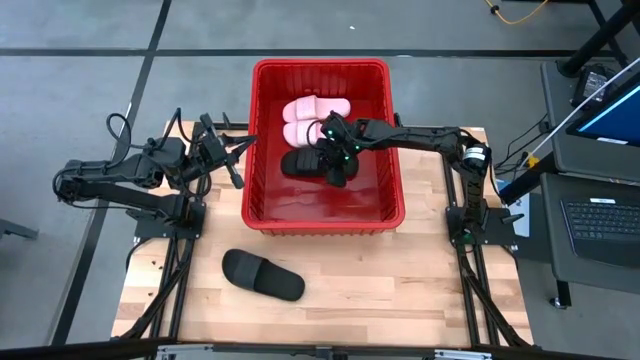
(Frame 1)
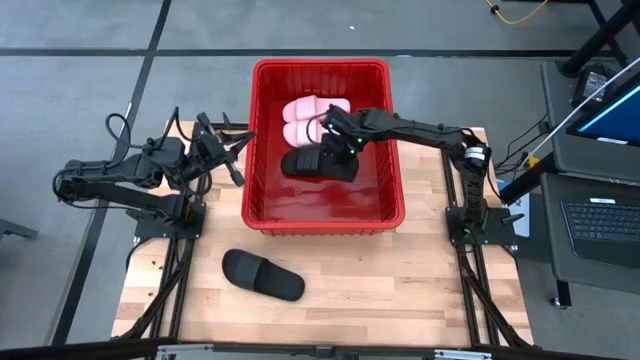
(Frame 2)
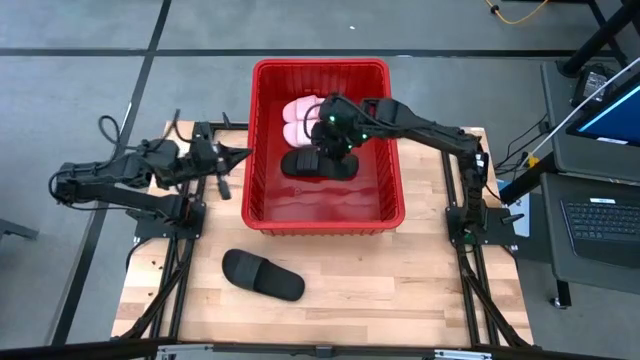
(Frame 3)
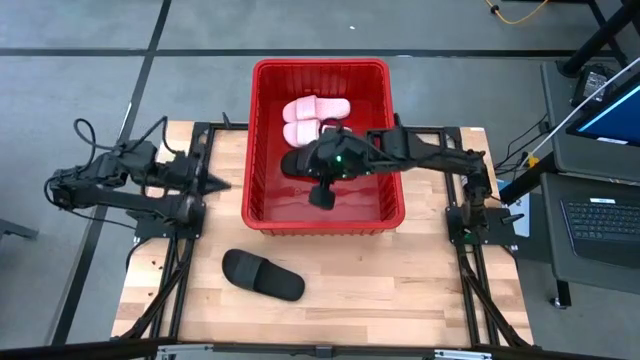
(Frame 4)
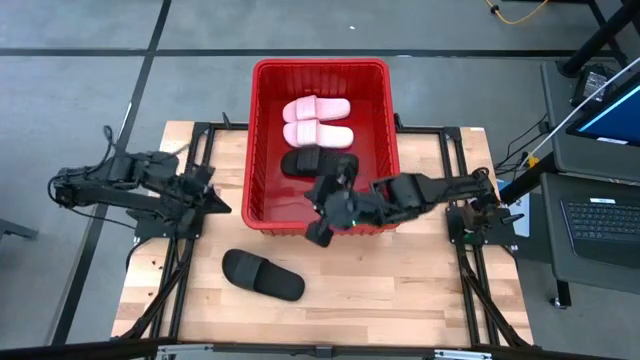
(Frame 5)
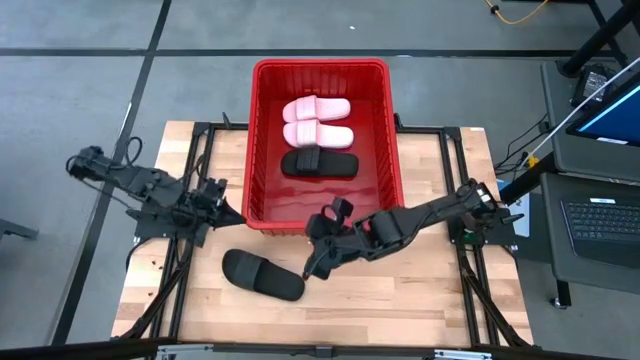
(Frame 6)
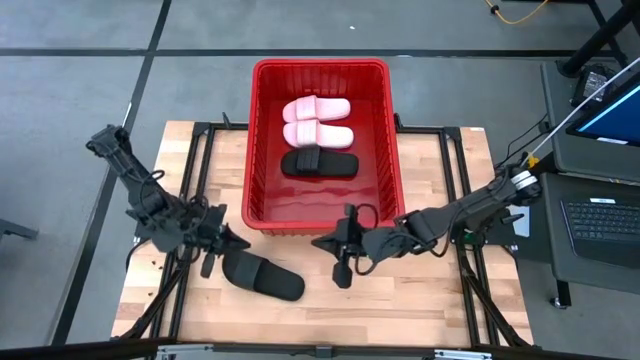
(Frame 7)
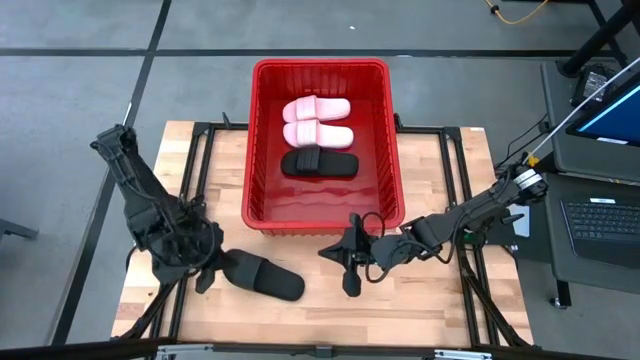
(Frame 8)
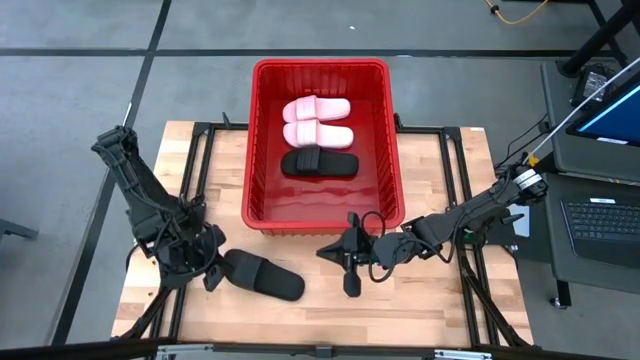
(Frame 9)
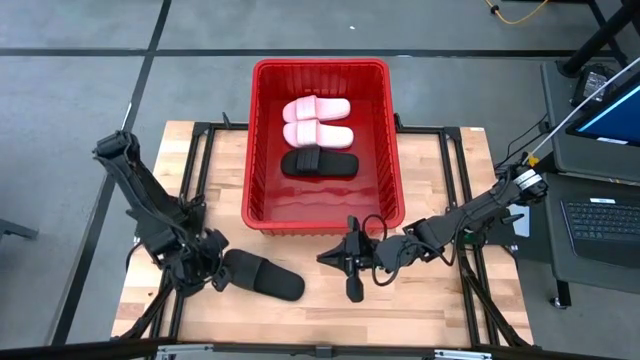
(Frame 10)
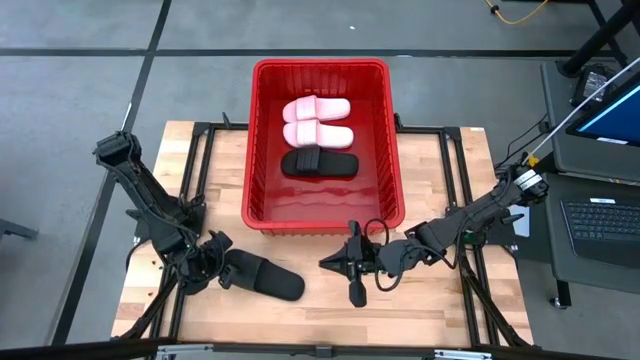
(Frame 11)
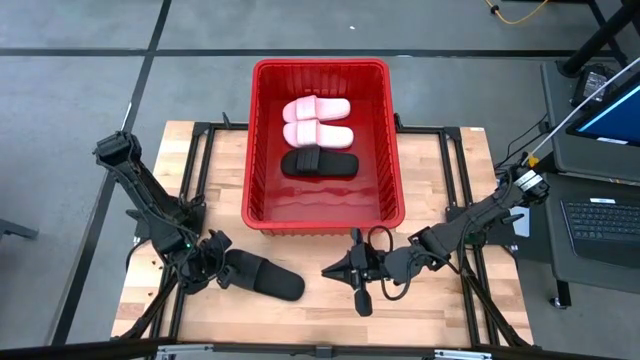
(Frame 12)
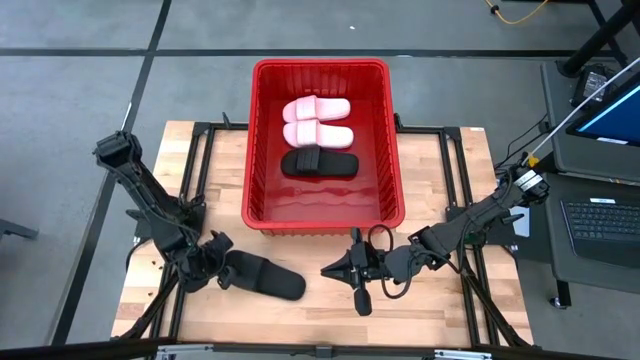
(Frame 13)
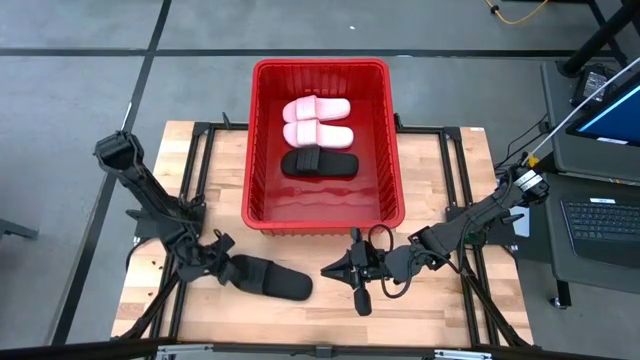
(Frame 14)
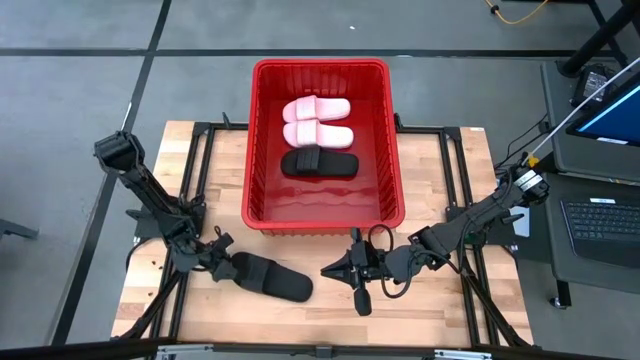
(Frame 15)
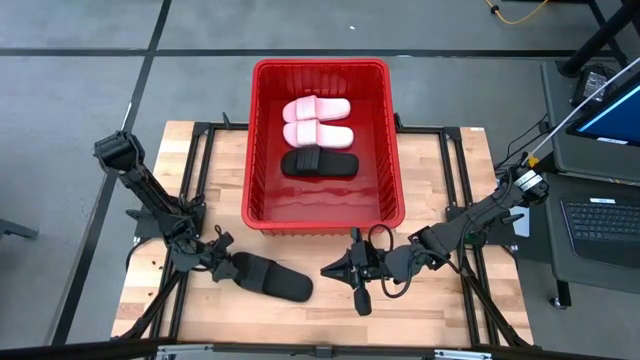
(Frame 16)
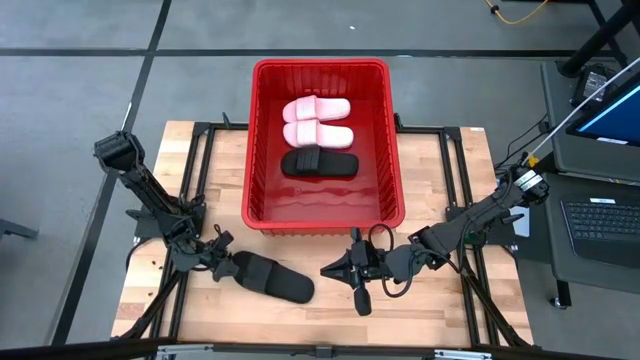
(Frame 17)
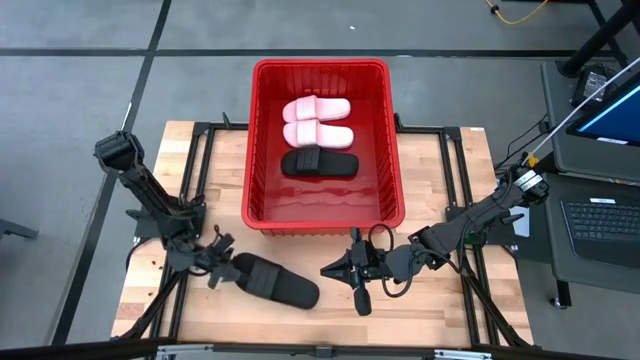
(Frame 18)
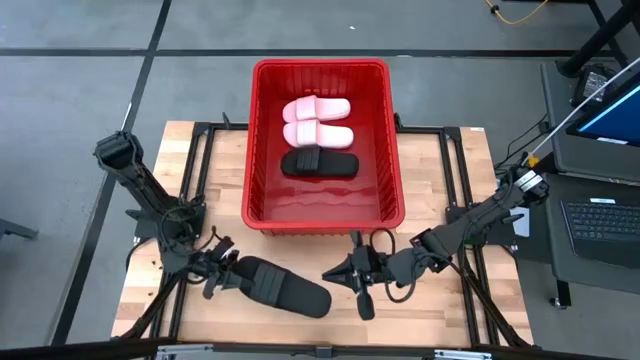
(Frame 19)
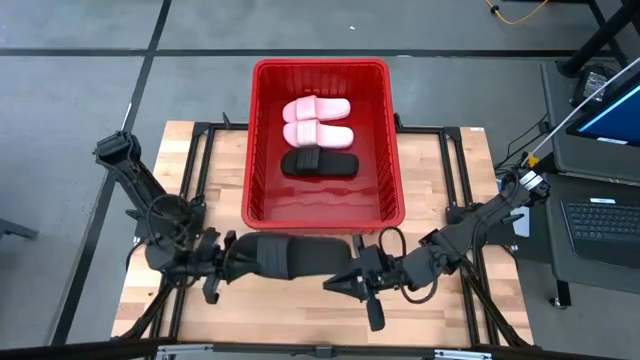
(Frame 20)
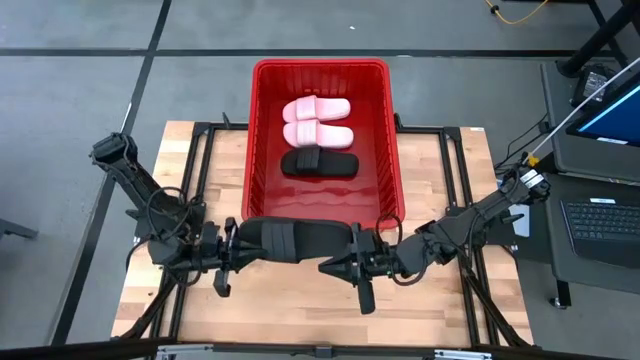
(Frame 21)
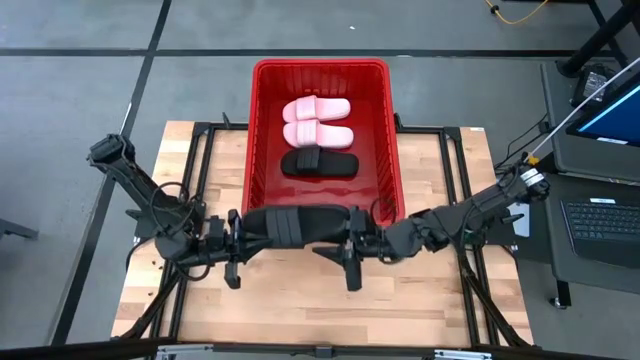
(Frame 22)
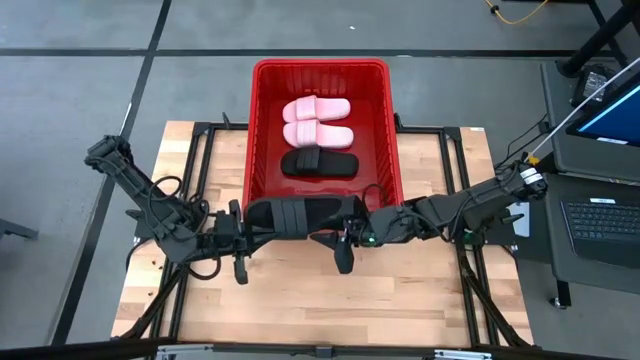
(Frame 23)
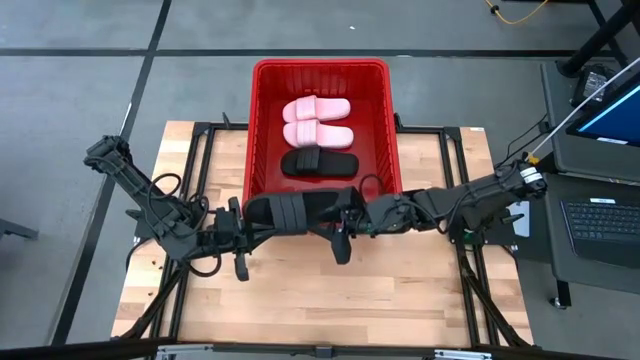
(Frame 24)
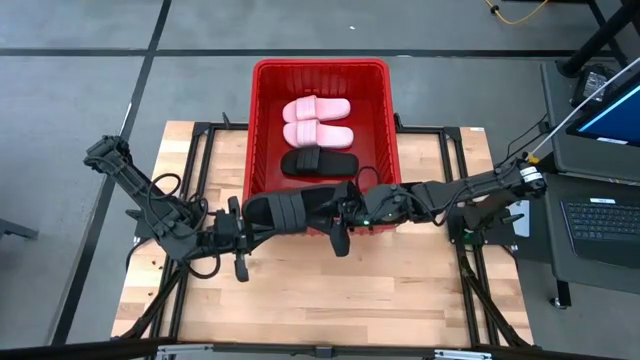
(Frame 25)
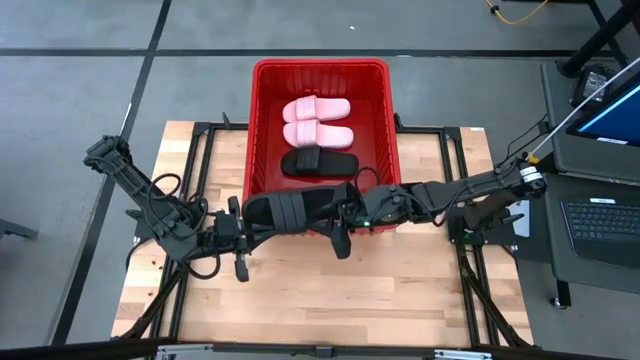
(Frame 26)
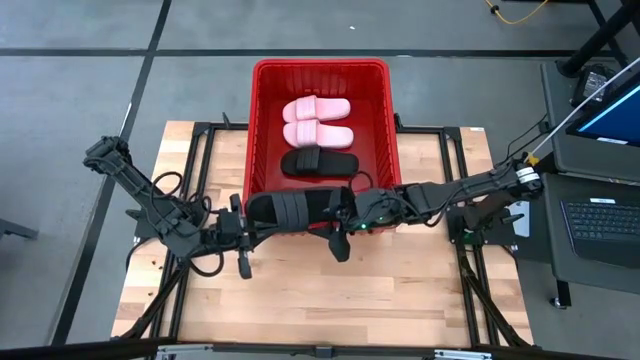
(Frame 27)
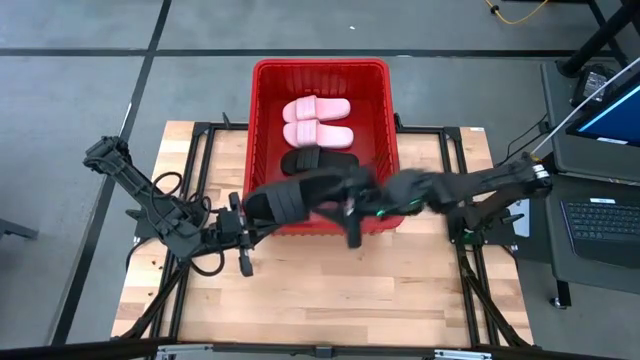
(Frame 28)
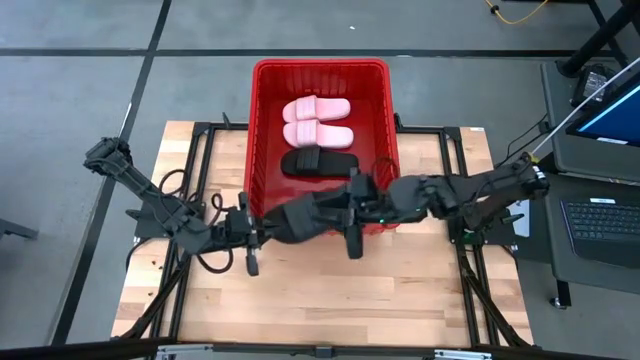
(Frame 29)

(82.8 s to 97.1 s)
Task: Pick and place slides into bin
Put the black slide into the bin

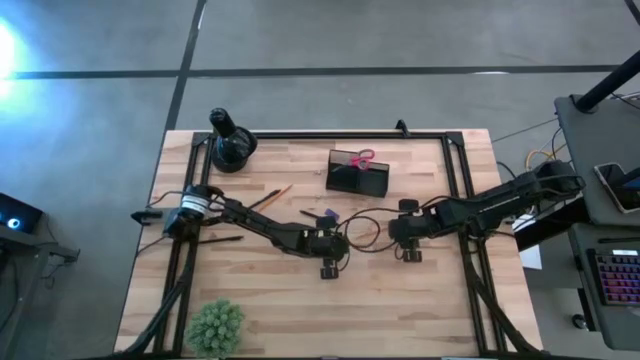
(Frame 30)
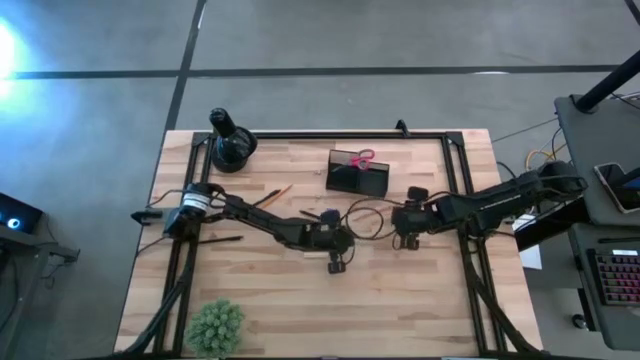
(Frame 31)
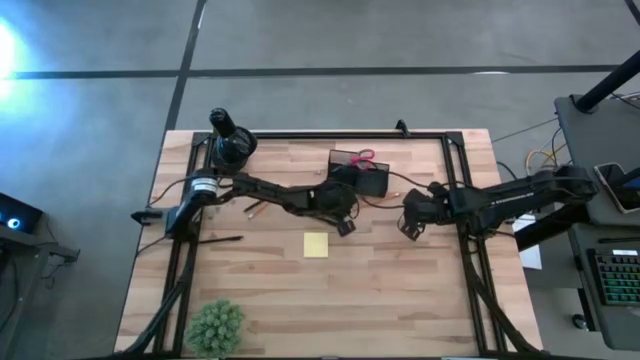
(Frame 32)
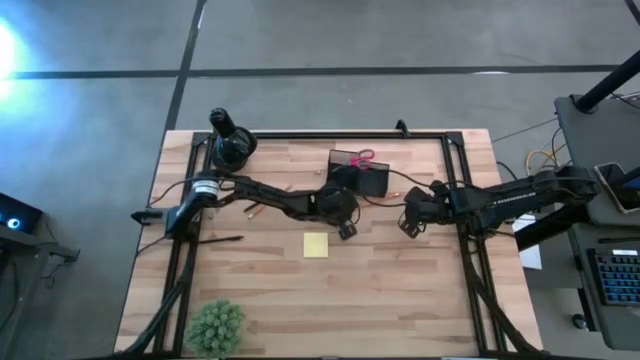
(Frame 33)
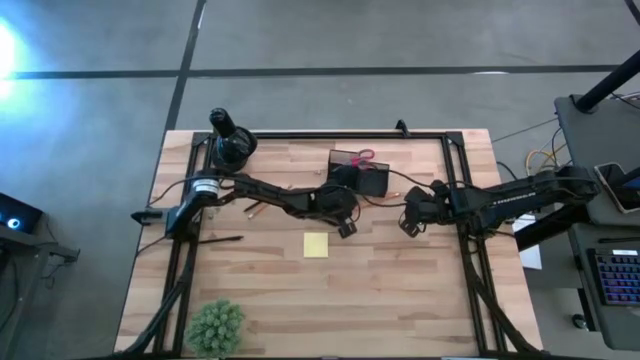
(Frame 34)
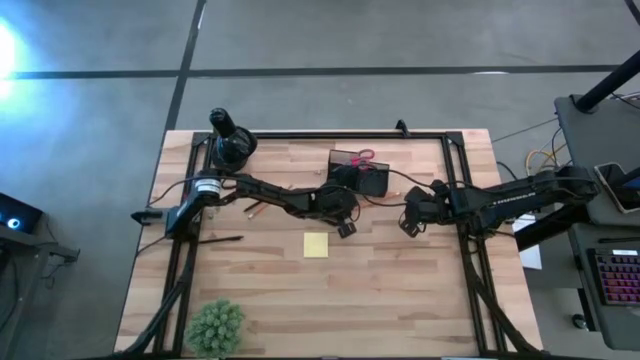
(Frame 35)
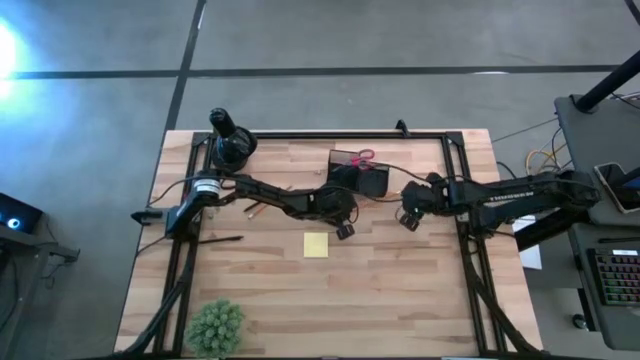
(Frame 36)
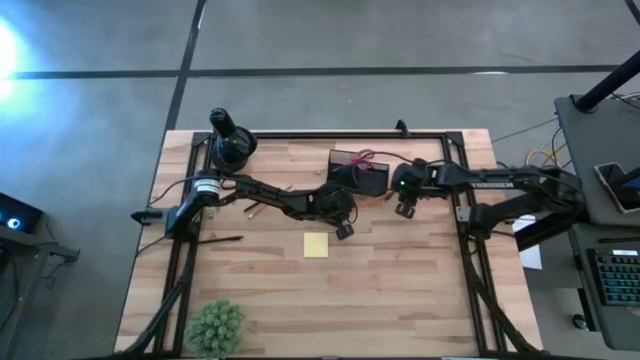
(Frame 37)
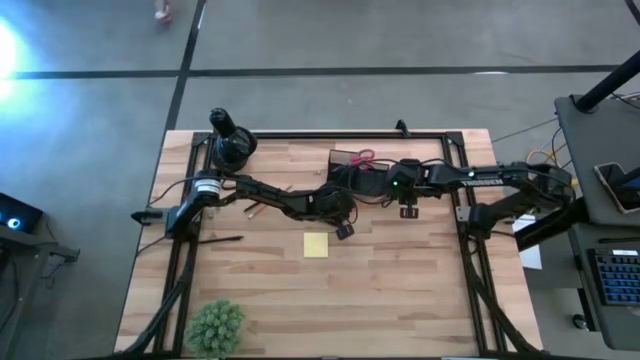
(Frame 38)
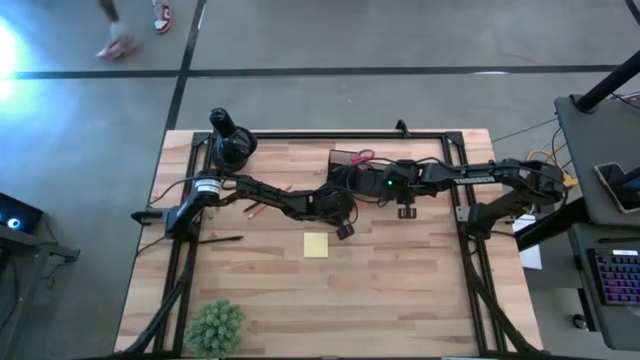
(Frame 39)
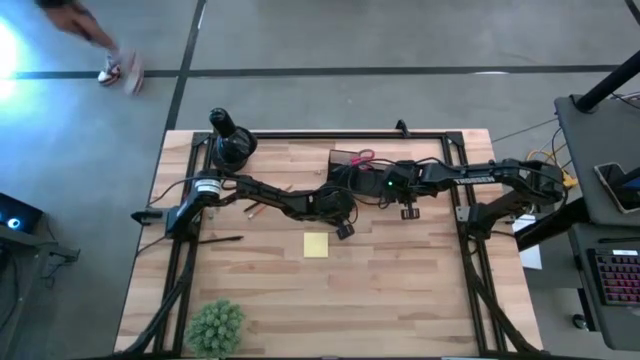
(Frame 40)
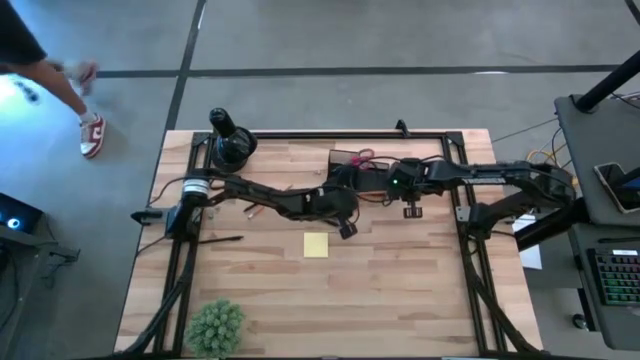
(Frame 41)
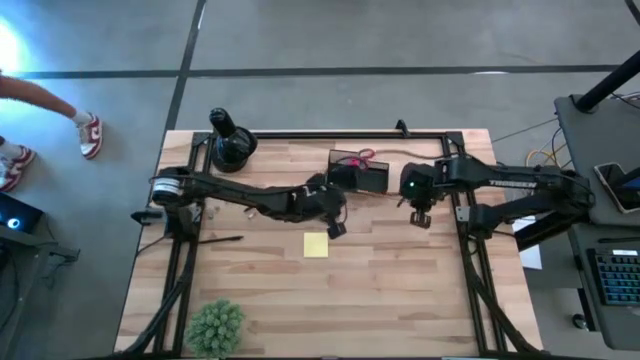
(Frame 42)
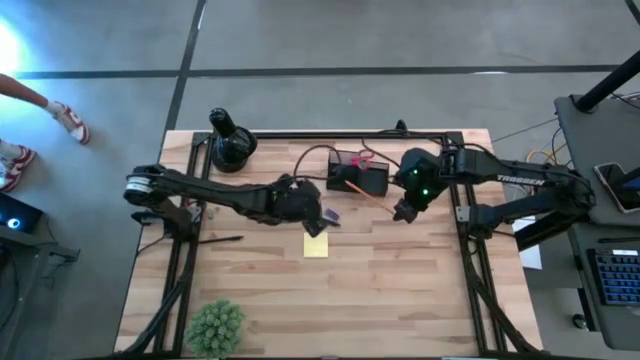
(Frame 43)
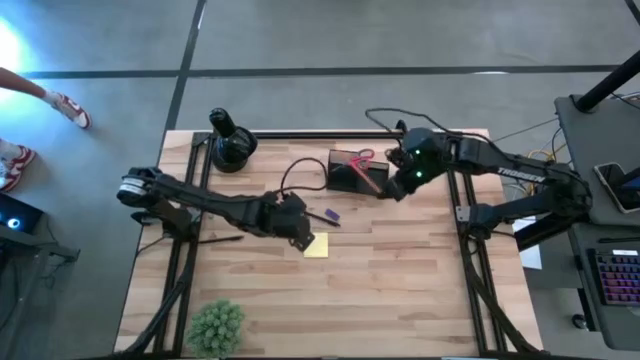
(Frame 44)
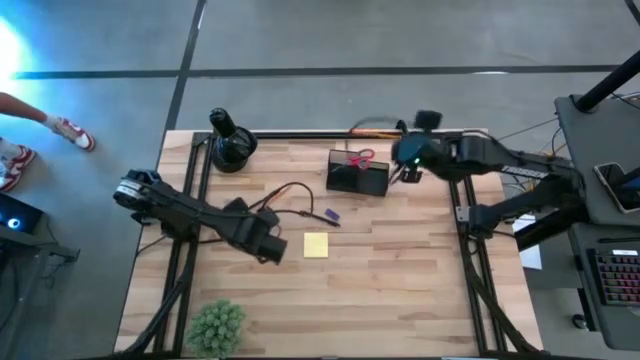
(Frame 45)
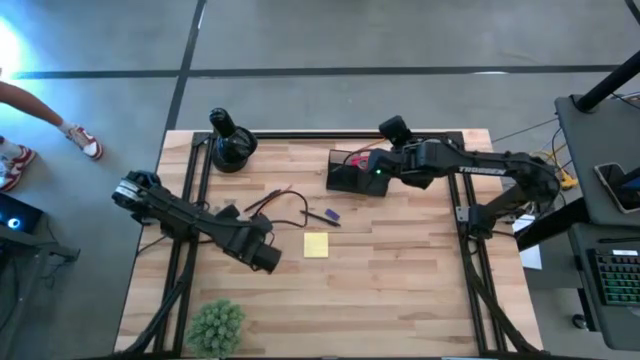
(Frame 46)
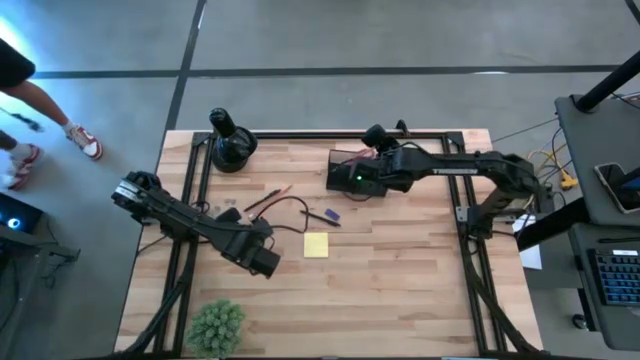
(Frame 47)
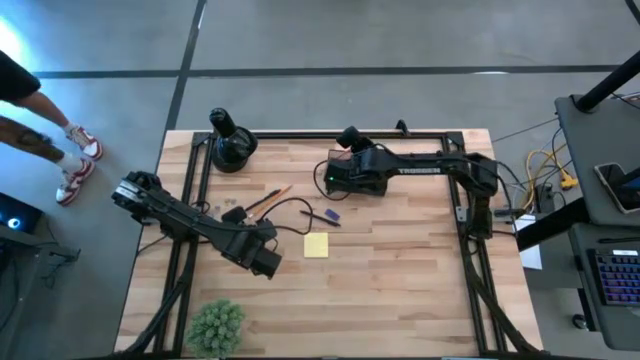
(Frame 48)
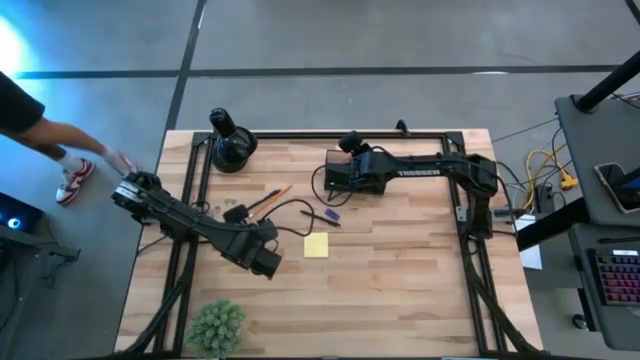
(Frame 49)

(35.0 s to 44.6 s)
Task: Pick and place office supplies into organizer
Put the right pencil into the desk organizer
